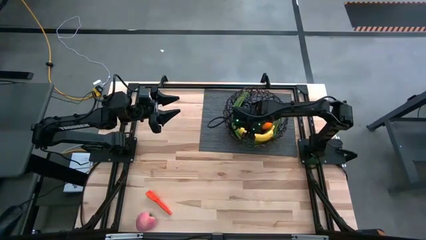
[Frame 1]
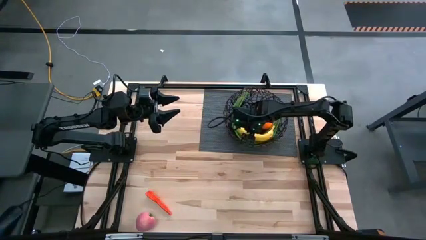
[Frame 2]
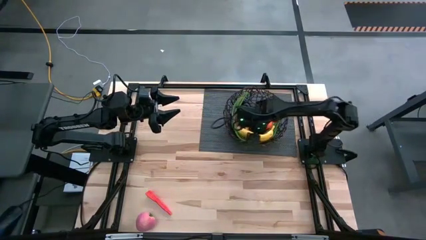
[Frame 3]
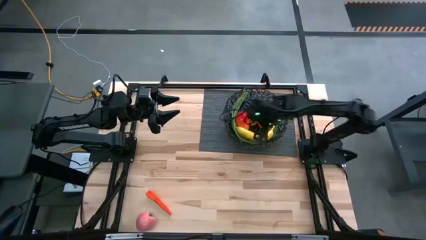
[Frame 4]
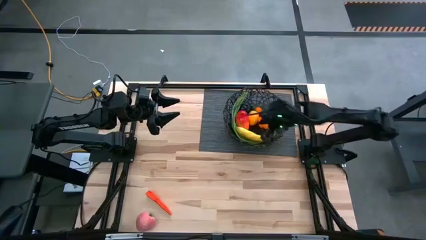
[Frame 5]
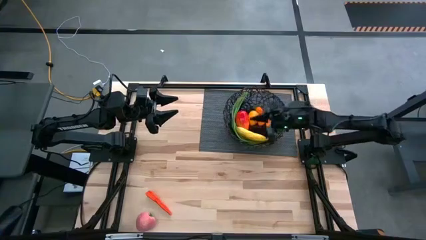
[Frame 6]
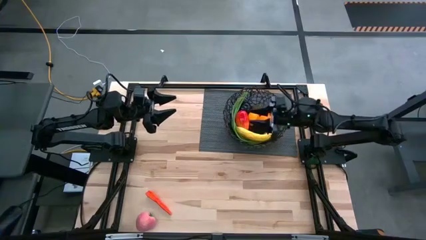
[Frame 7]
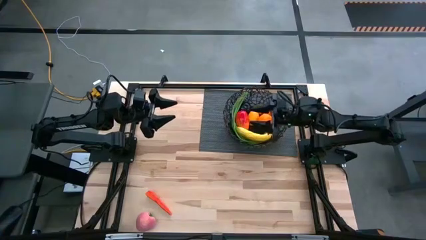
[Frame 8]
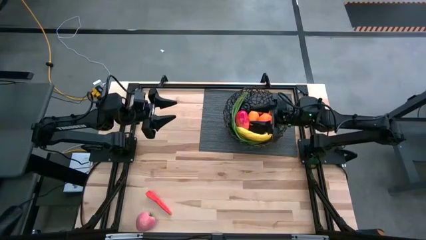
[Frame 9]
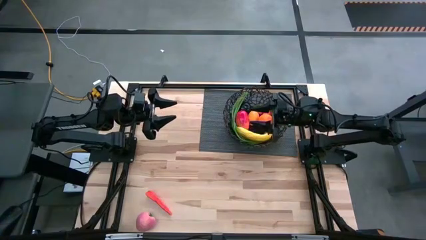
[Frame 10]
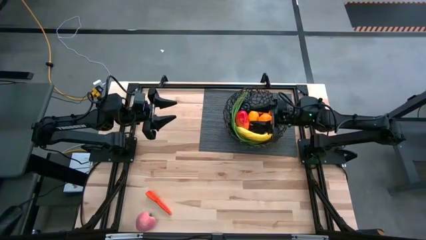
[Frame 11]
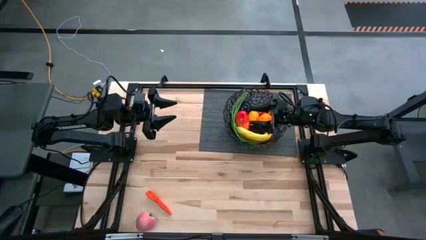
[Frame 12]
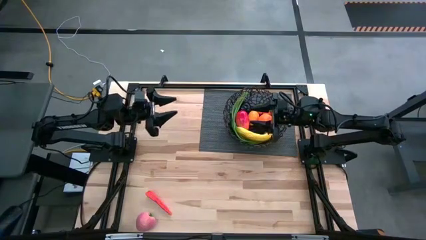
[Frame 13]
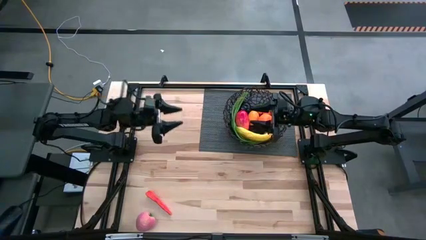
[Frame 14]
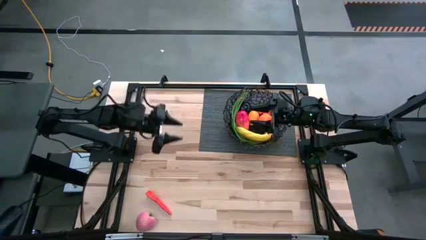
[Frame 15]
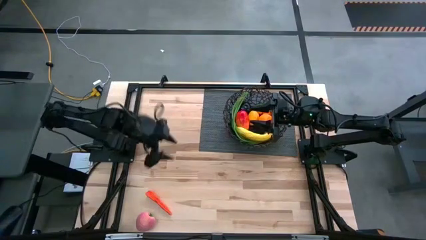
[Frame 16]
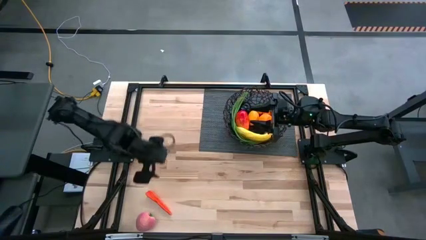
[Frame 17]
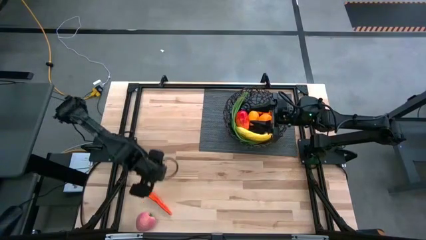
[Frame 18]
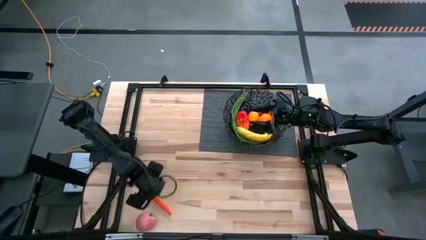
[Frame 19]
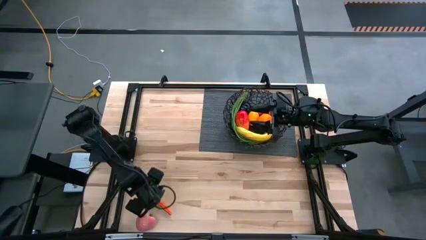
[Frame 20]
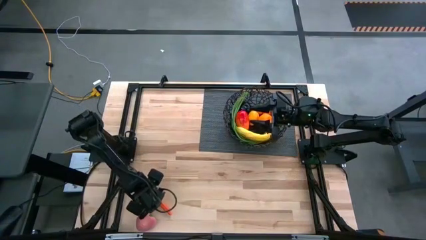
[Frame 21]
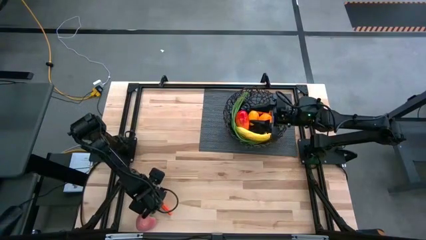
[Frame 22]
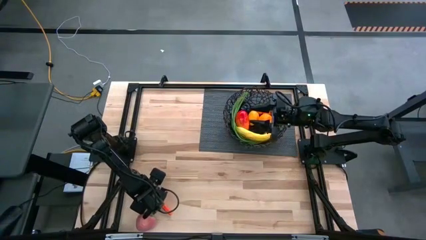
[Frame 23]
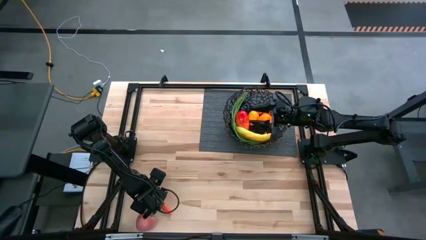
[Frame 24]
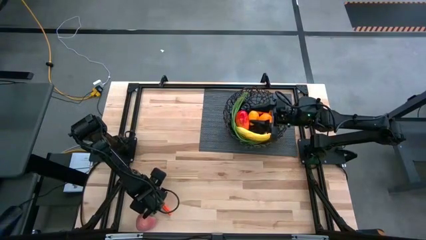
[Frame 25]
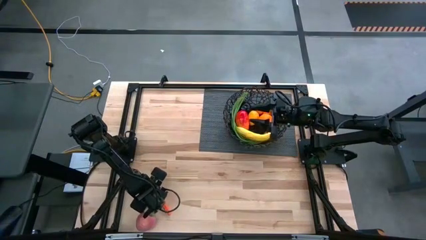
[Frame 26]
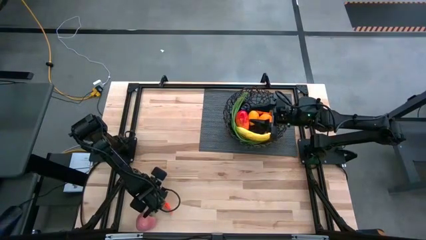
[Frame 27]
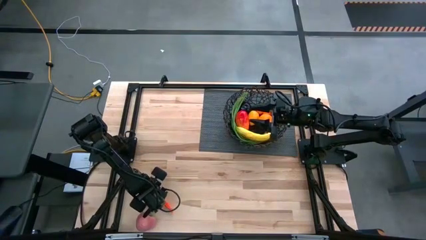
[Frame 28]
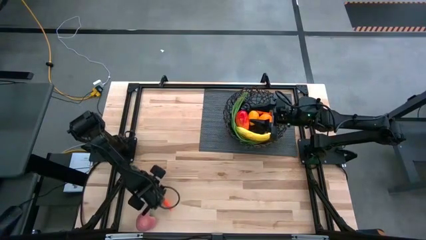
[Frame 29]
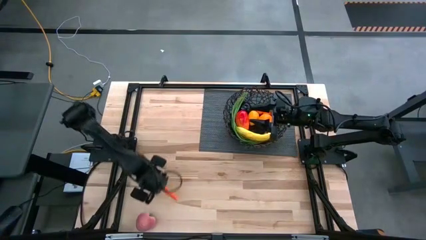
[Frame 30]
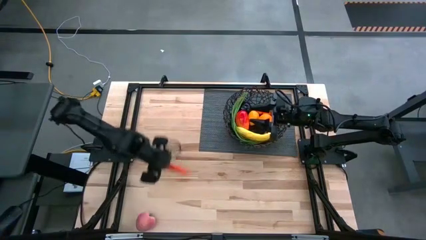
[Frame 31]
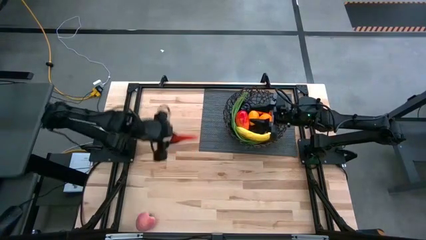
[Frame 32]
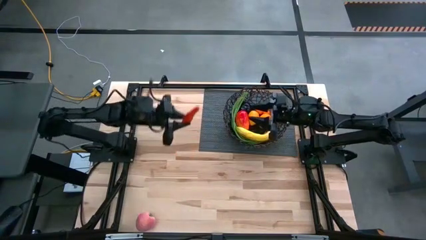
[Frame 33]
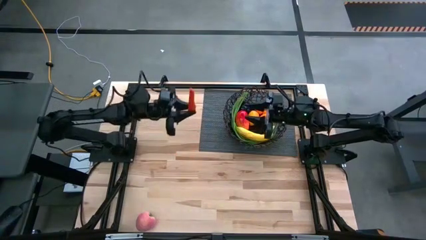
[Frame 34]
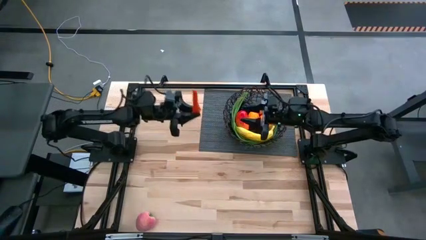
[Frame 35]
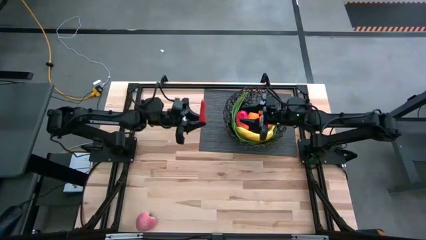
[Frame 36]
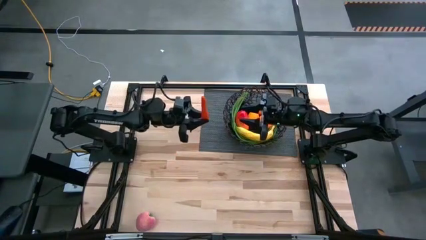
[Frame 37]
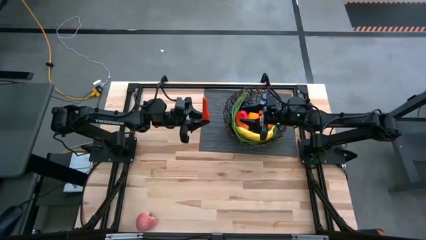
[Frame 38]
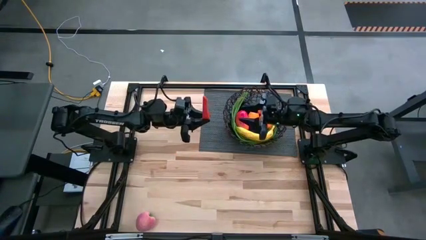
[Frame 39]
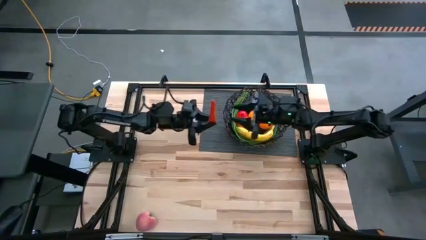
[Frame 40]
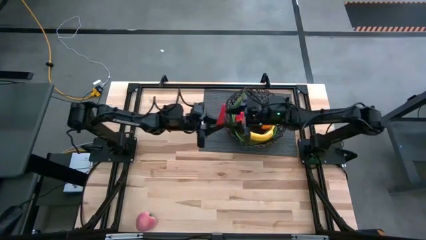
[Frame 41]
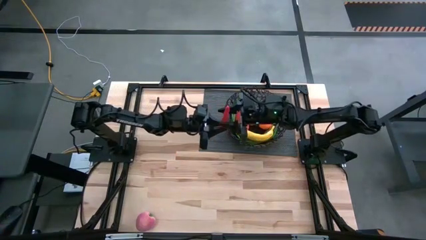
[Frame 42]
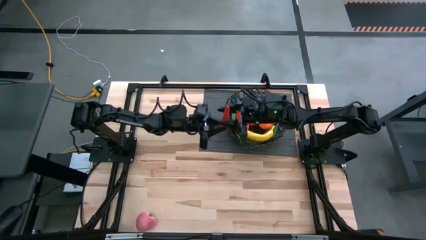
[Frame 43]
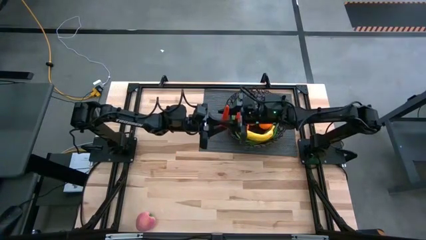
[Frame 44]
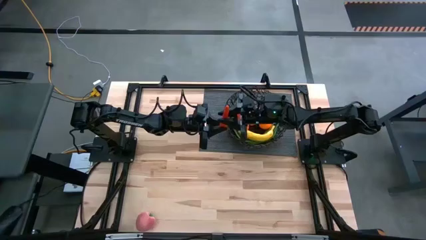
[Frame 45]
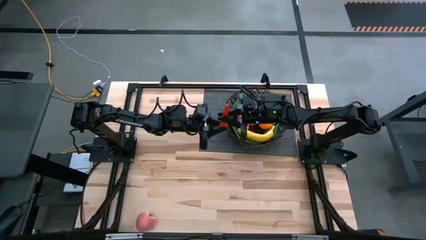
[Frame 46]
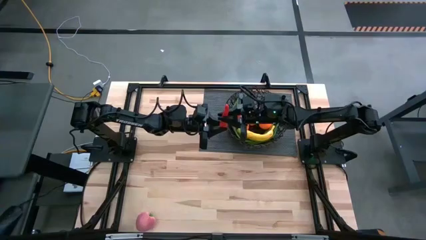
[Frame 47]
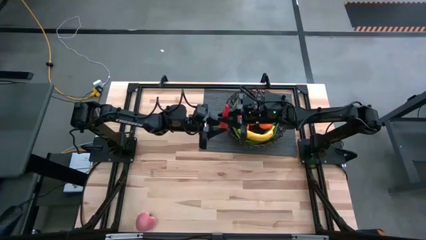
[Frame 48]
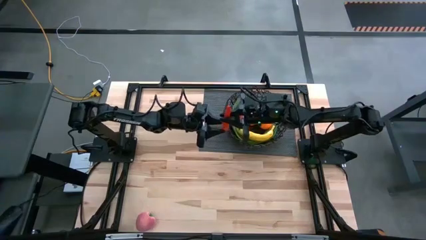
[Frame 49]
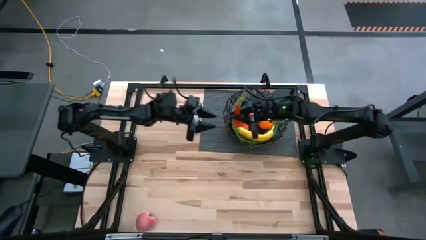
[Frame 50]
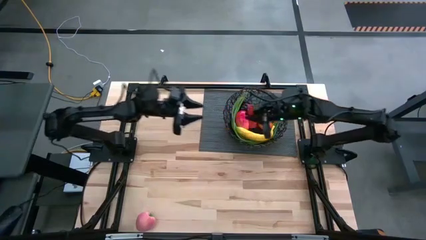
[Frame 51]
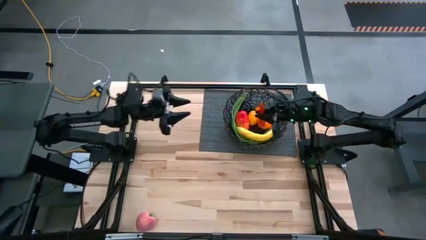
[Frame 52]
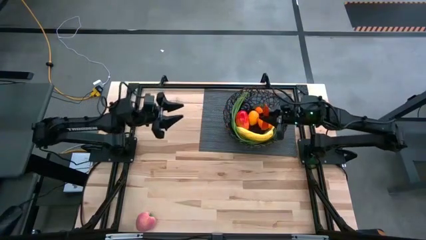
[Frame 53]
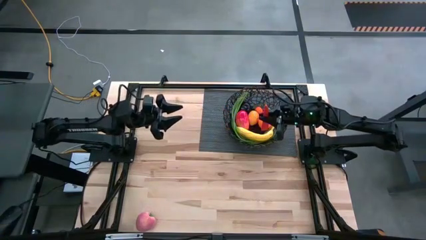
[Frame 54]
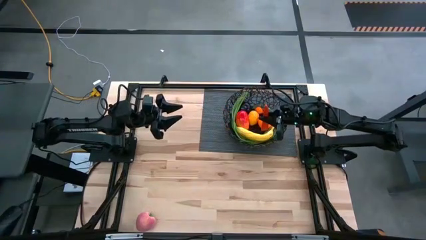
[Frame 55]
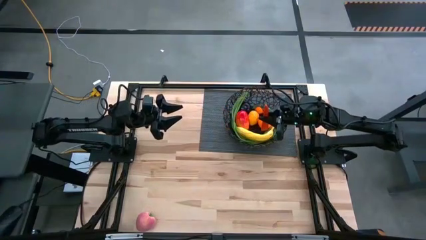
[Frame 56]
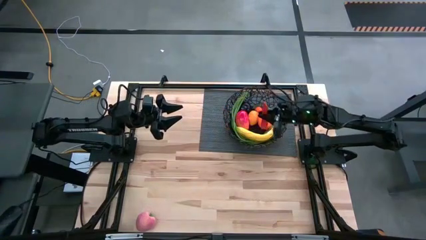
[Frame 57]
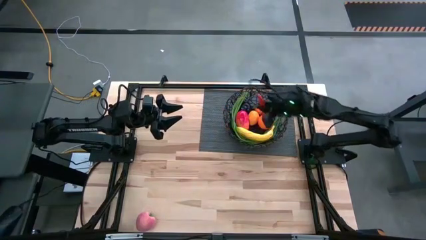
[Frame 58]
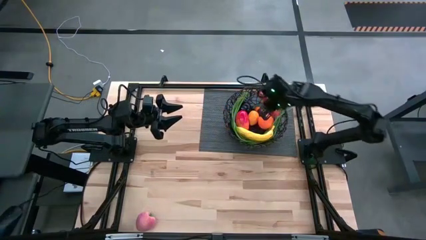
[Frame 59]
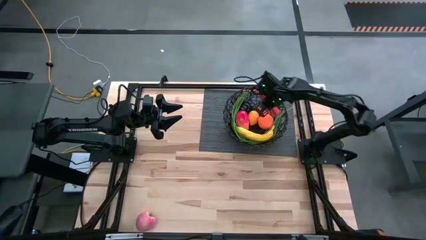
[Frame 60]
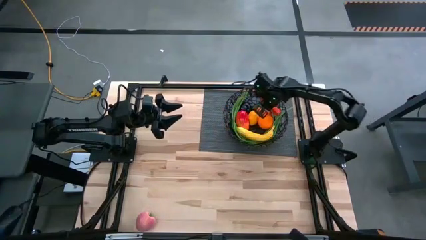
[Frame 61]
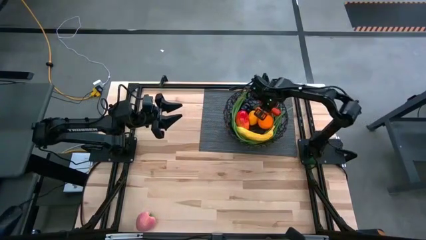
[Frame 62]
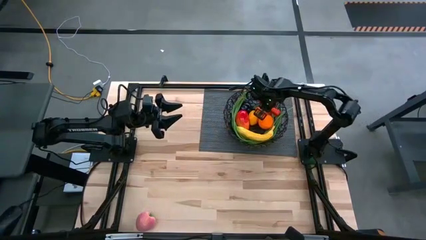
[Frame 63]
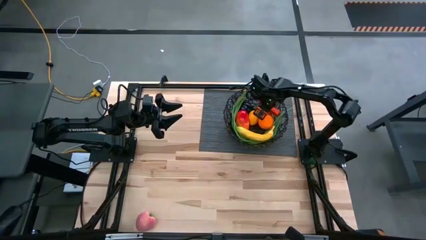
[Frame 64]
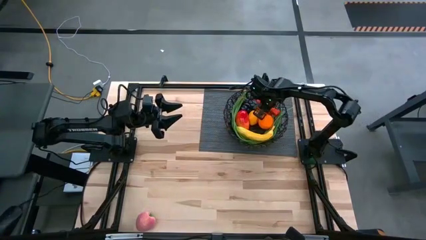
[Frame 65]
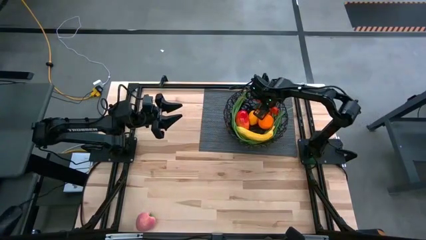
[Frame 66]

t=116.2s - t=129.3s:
Task: Build produce basket
Put the carrot into the wire basket

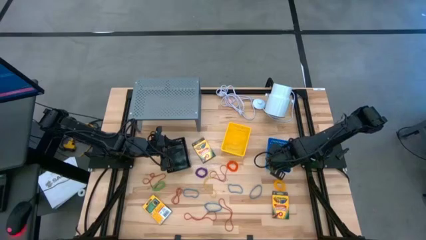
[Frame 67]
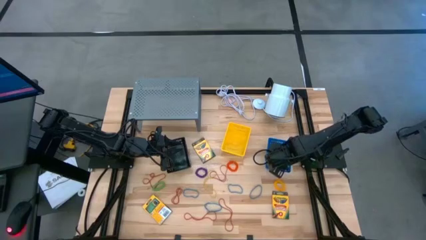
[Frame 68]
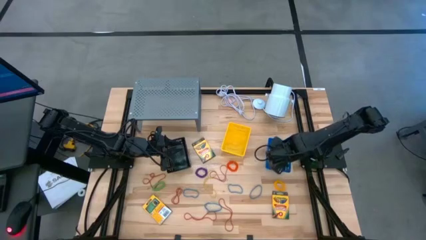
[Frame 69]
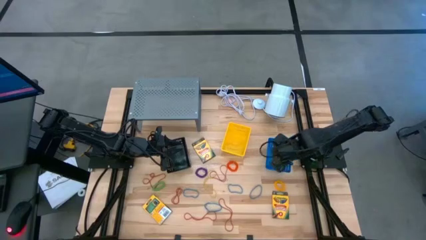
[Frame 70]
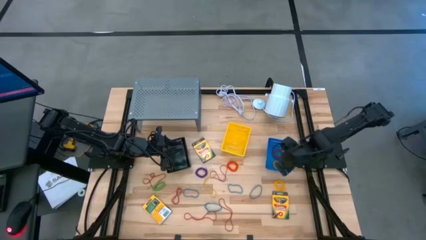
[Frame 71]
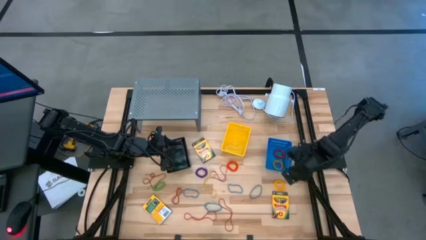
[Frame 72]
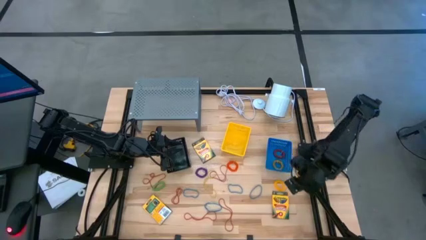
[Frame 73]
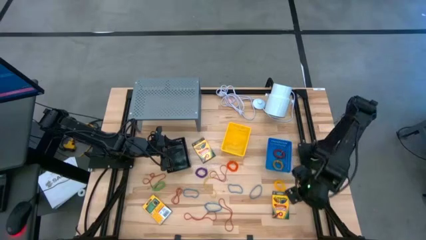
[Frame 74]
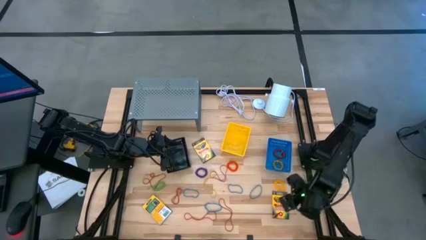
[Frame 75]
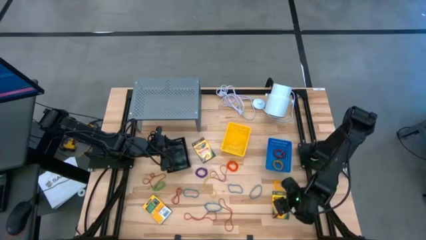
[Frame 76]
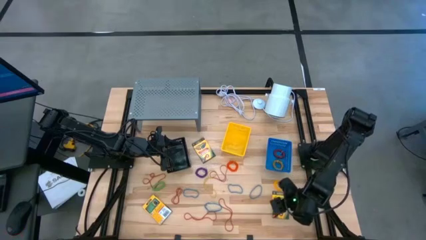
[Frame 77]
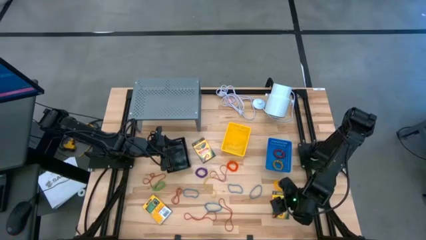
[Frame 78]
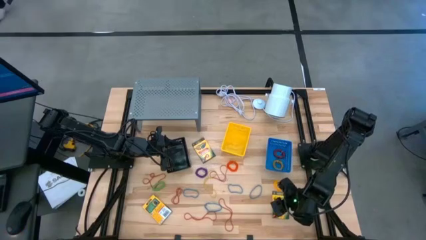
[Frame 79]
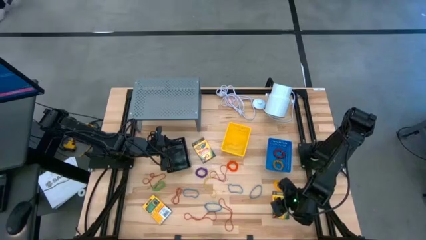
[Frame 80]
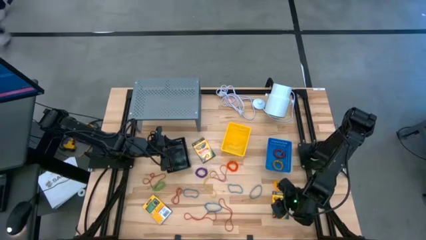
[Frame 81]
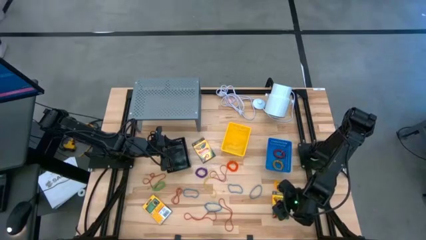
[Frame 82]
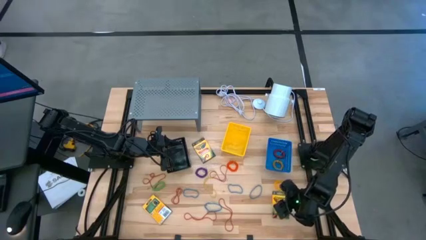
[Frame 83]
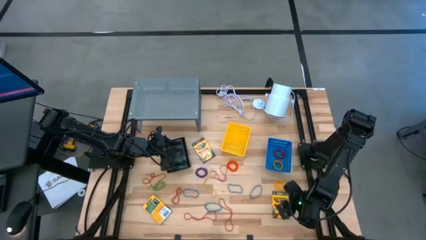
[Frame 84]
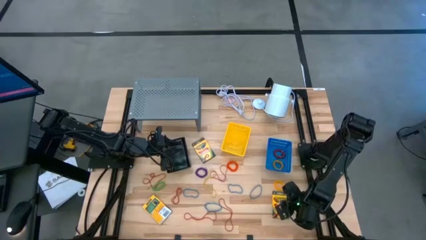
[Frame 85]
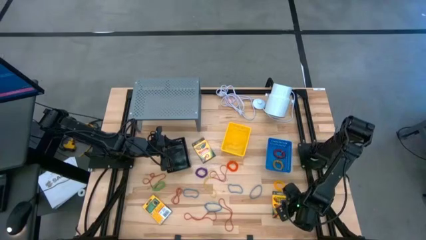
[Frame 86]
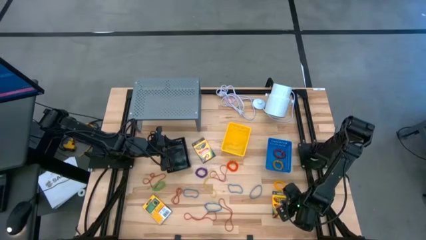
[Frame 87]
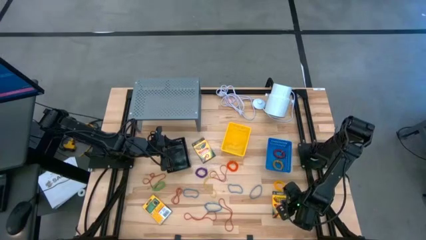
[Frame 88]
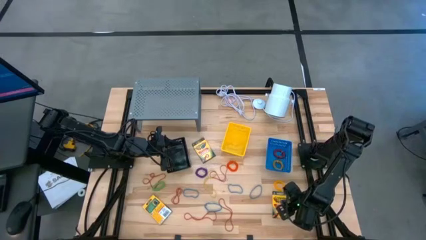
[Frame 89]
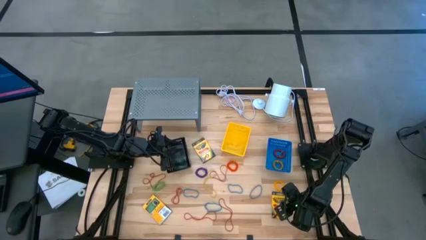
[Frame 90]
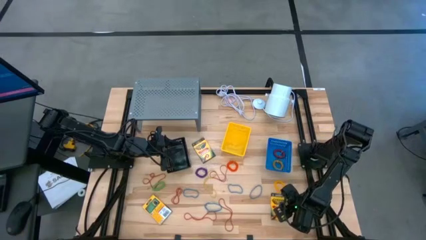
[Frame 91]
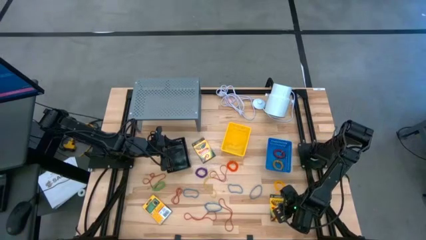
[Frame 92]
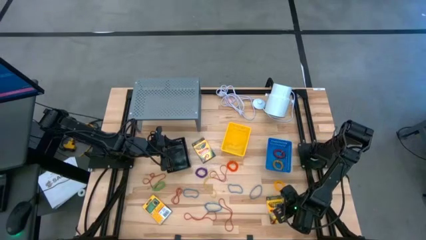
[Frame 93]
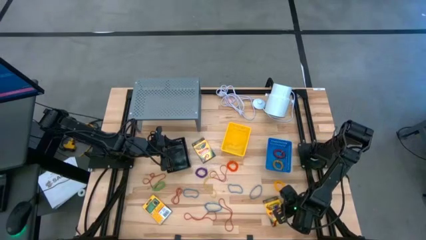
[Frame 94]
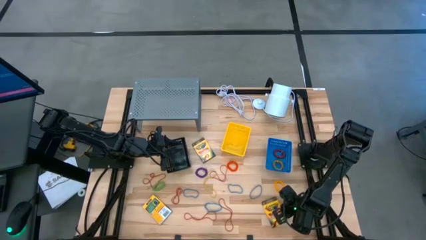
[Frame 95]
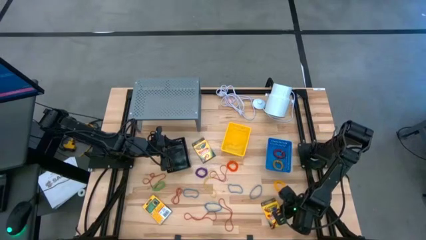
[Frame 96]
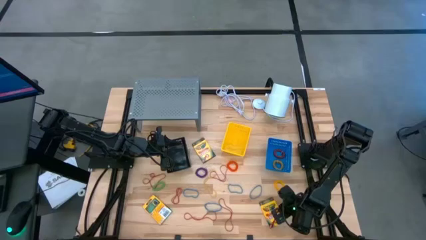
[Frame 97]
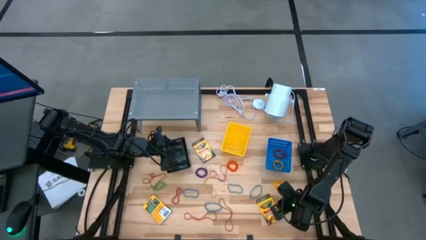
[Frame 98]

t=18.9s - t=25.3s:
Task: Pick & Place Office Desk Supplies
Put the yellow crayon box into the yellow bin
